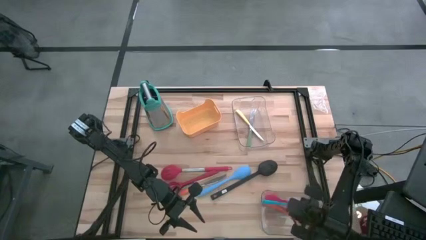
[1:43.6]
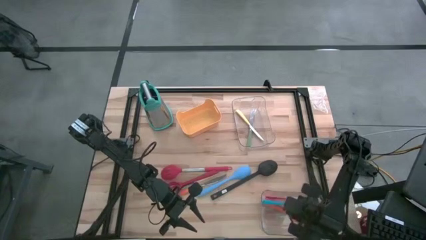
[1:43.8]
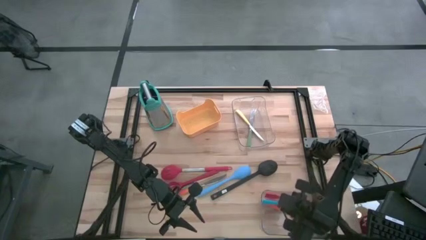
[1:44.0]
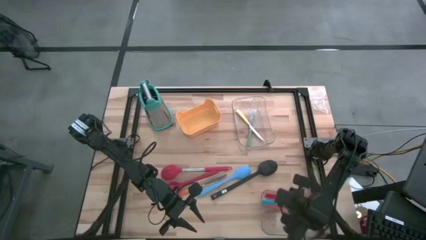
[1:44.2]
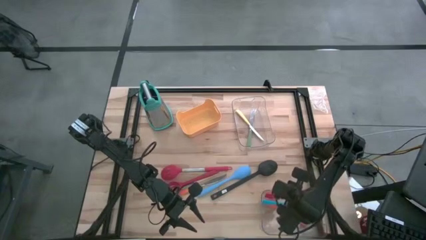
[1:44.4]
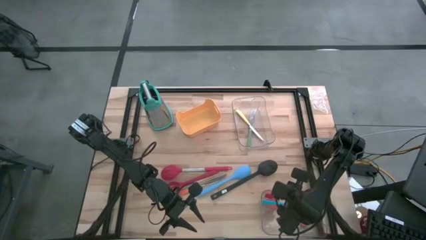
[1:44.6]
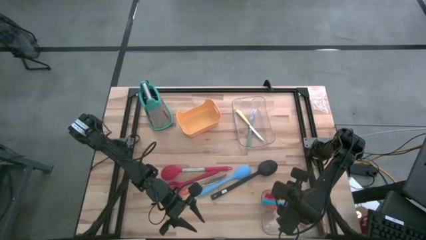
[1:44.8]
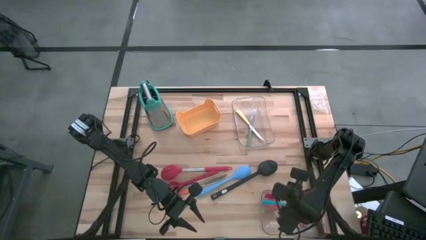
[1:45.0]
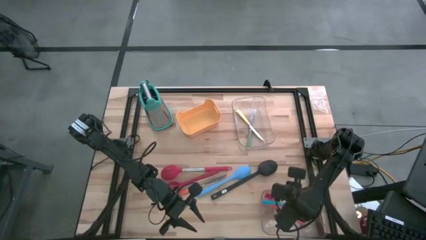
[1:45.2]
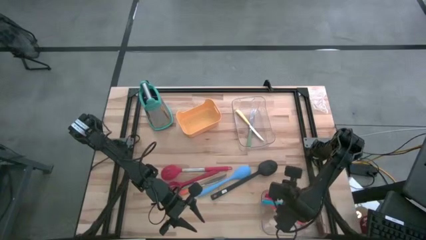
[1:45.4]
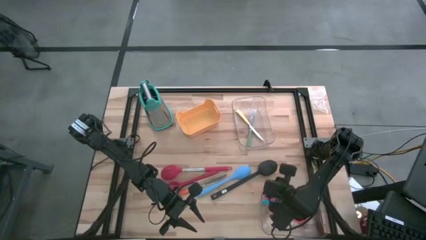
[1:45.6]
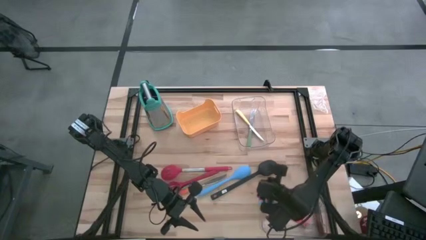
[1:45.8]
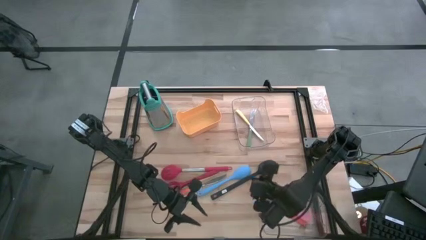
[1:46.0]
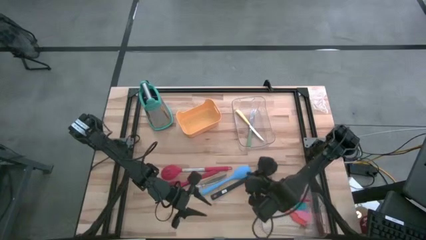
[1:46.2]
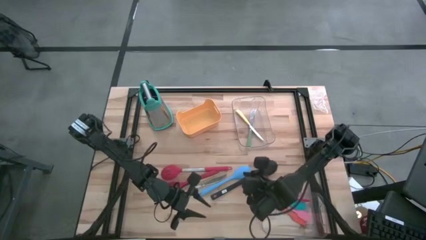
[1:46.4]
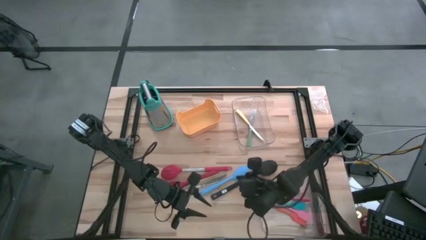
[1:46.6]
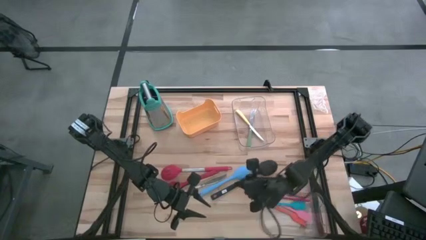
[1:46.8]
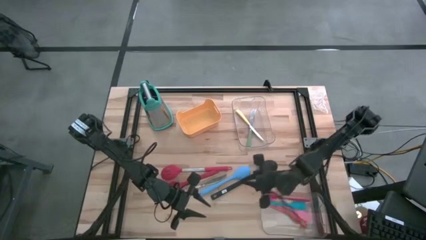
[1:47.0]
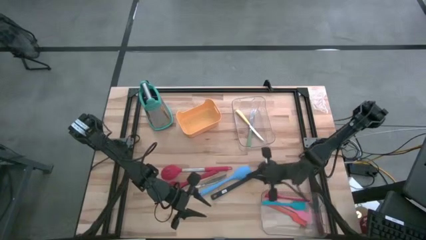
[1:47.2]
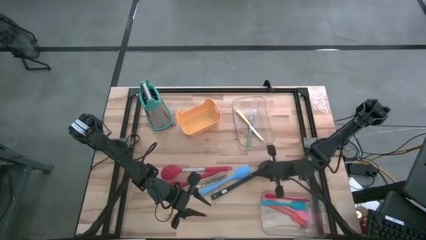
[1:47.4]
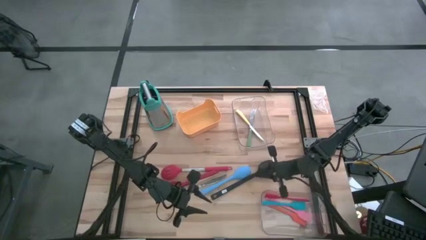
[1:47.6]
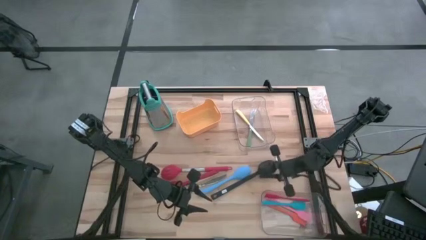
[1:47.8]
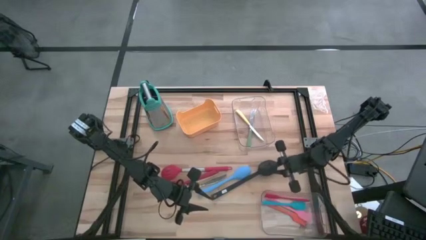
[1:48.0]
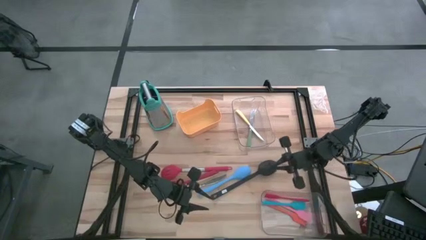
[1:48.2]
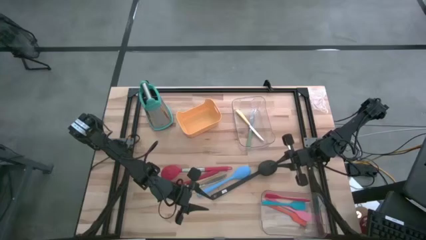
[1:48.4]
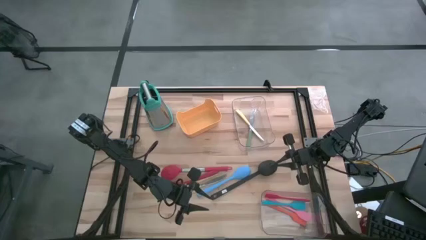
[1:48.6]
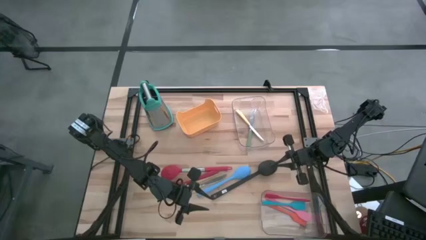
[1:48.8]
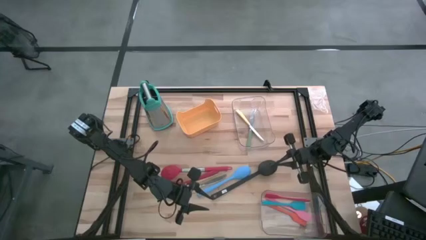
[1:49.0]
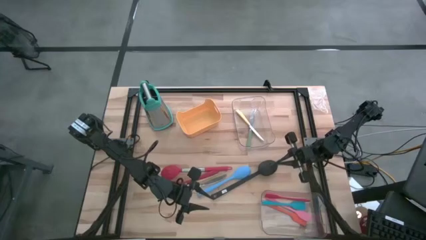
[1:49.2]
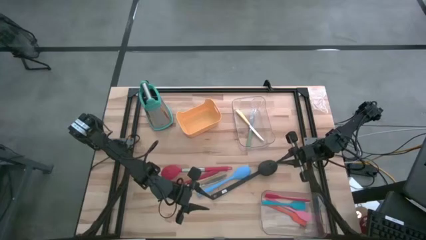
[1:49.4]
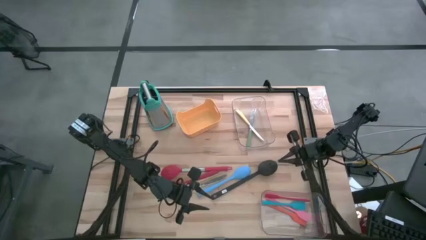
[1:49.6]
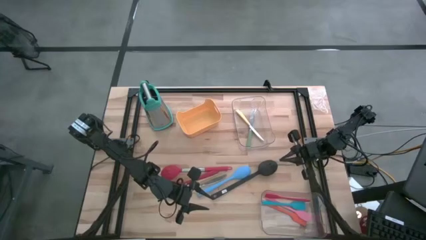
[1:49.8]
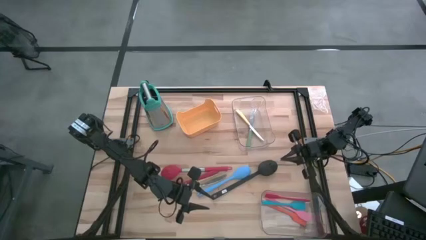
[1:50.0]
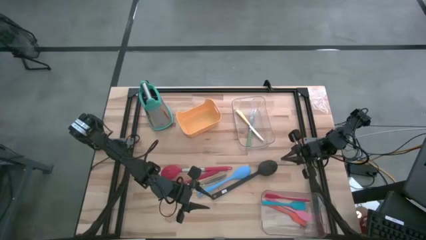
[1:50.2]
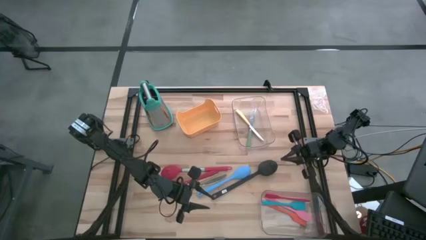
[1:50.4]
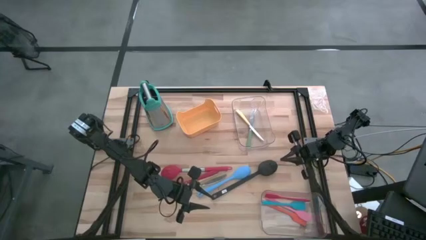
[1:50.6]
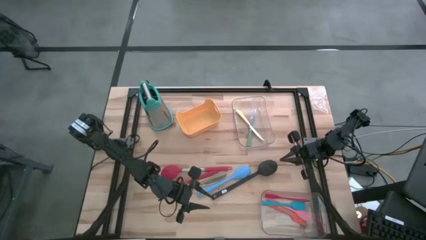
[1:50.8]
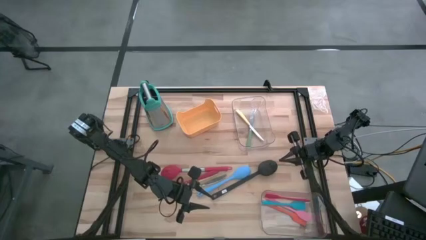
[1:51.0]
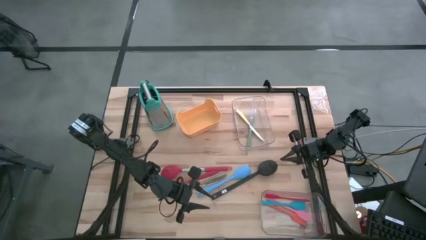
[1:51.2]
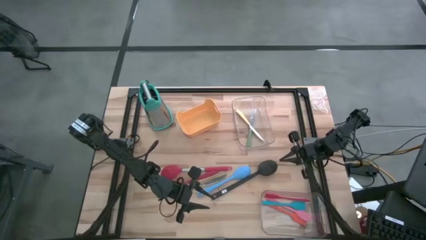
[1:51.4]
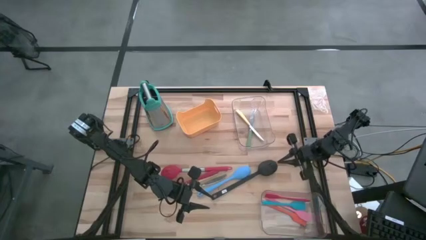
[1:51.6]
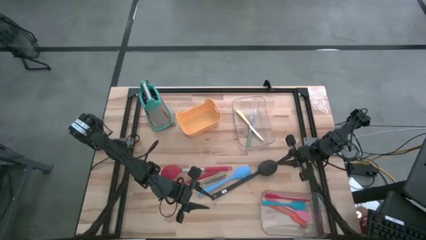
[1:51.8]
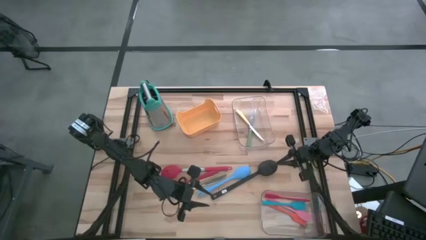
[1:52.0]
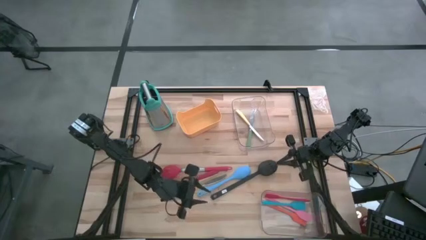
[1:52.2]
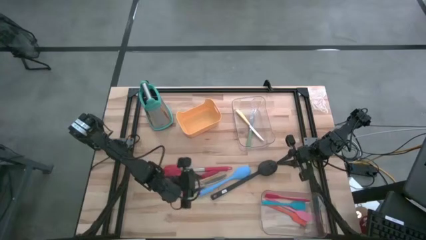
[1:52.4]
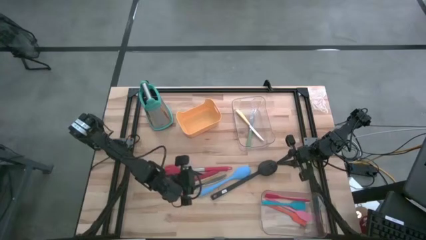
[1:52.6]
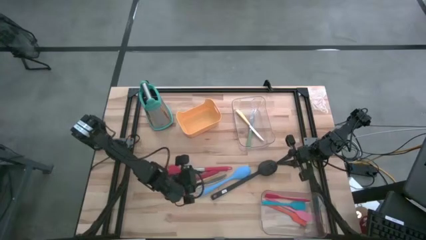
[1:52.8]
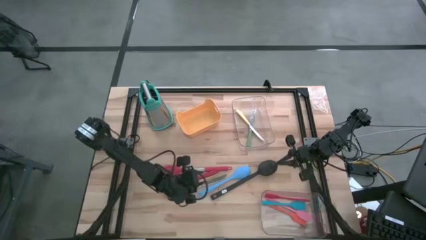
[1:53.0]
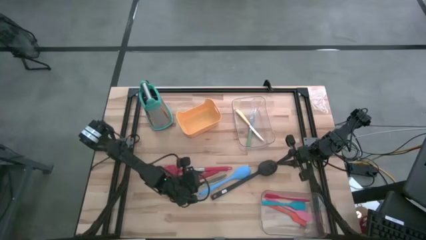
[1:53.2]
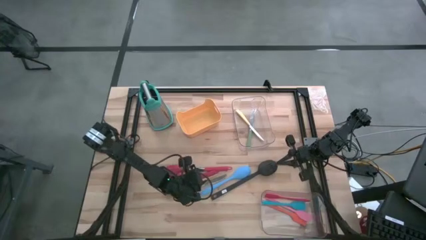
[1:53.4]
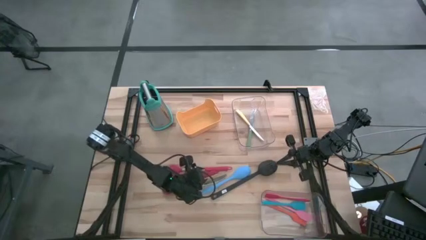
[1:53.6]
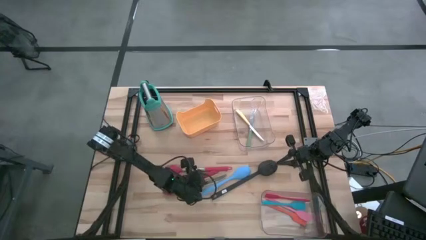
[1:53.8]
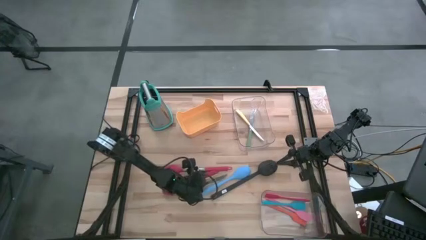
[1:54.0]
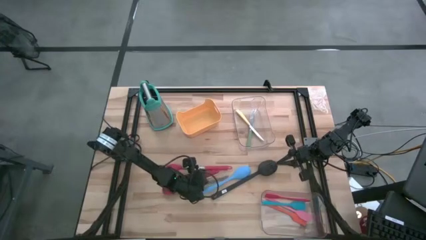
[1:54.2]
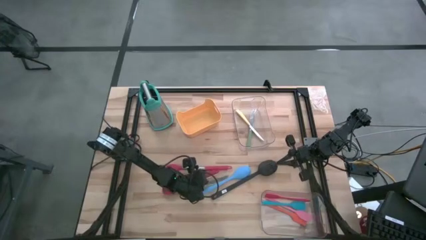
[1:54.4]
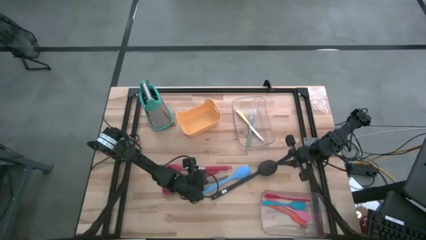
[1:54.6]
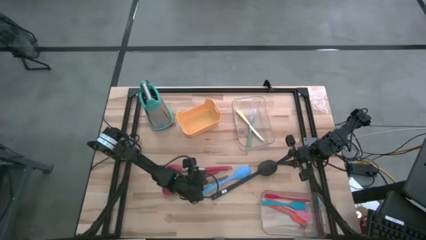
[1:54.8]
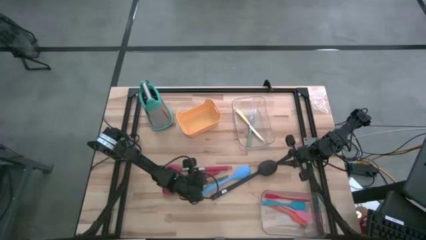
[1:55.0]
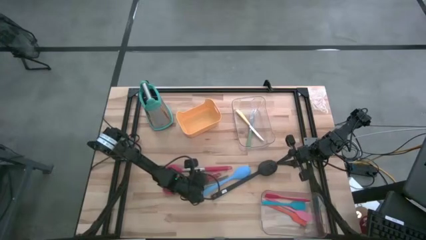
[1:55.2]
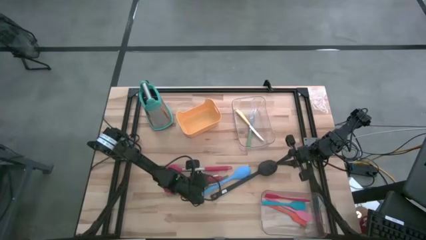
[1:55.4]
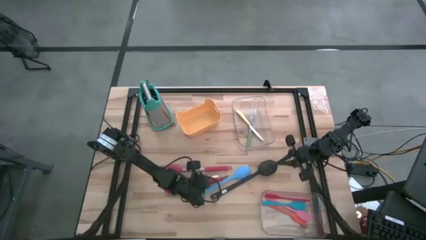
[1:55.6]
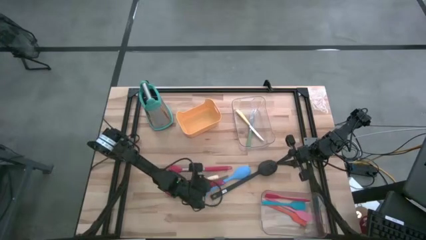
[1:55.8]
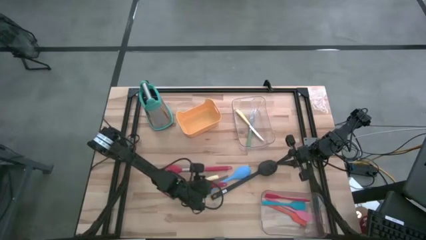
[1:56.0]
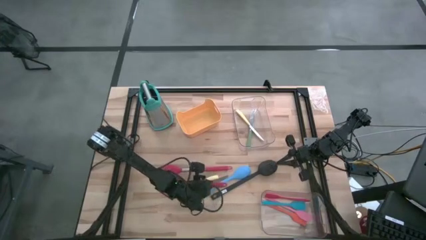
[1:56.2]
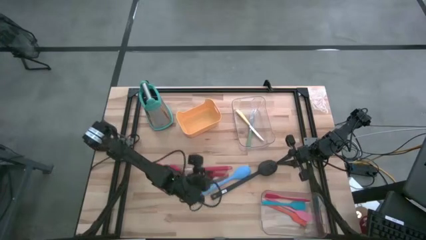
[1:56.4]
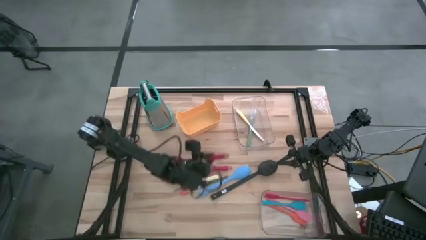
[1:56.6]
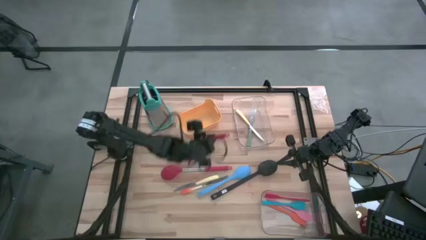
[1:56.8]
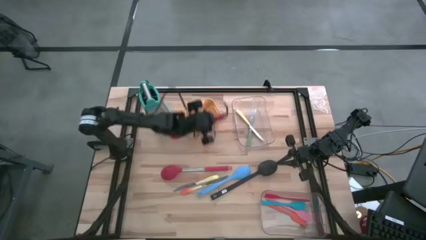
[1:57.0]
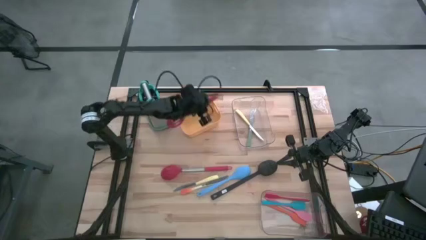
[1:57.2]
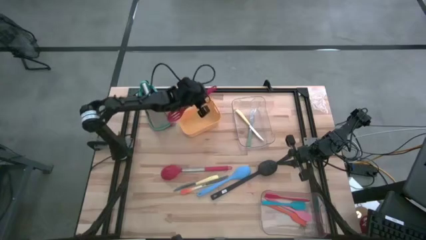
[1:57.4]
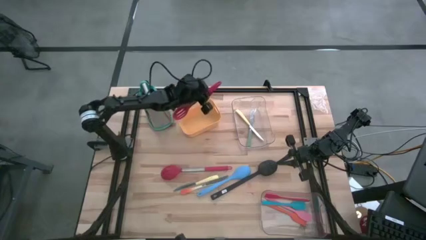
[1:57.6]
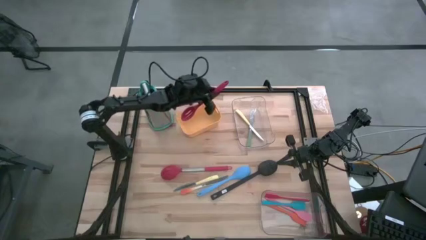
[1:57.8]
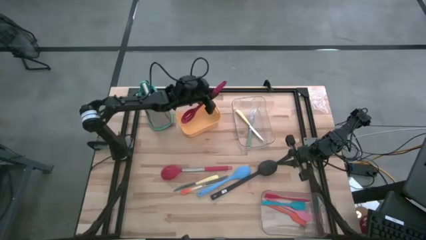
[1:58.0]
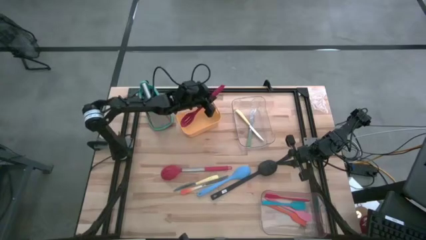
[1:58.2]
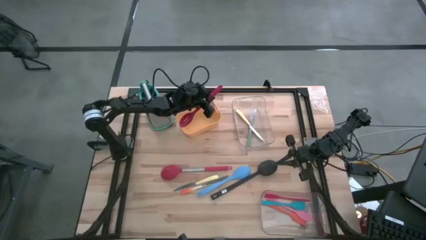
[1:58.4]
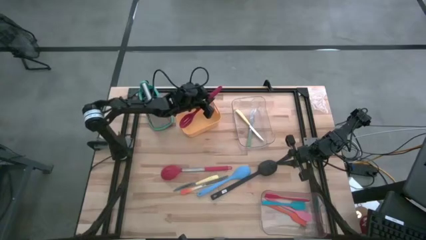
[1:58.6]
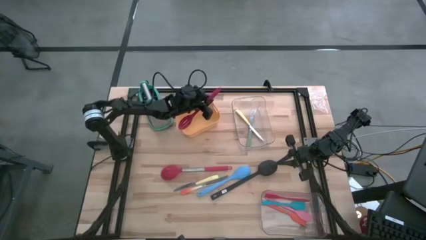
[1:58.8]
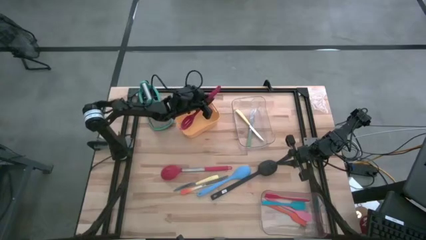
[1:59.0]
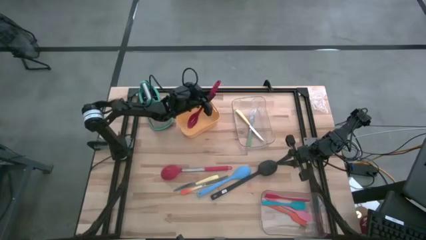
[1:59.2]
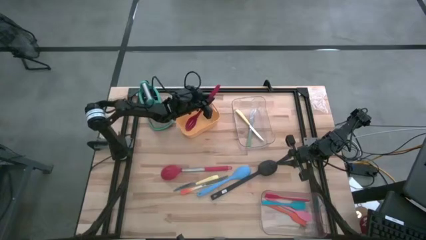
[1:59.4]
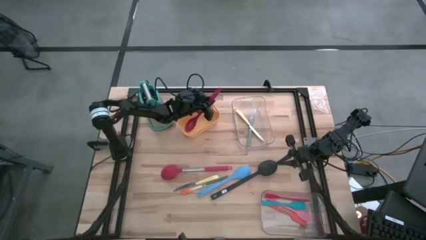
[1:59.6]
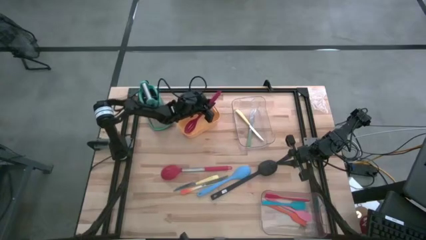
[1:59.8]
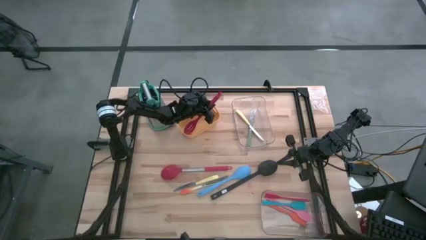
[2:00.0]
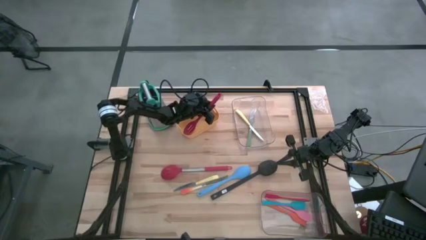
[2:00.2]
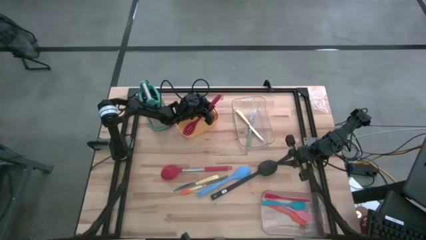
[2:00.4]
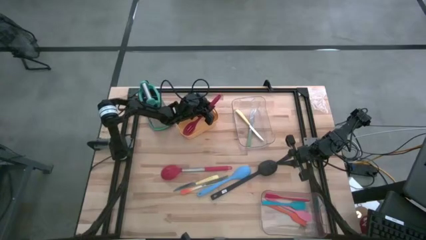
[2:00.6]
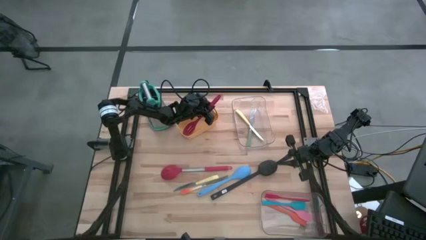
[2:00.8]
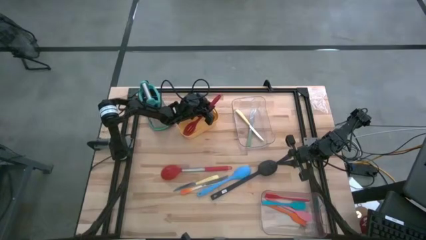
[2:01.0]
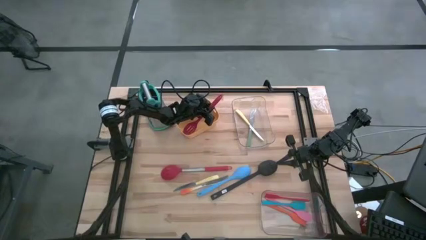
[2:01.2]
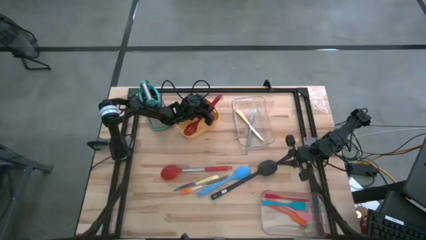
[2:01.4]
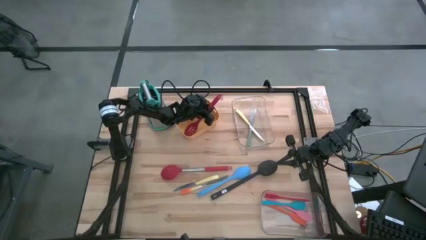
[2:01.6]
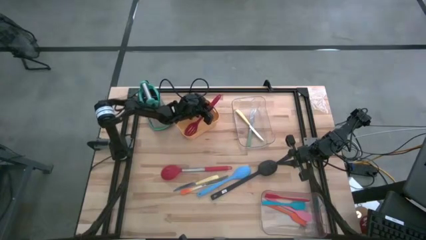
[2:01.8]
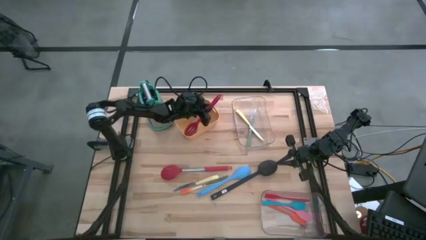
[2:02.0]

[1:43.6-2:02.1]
Task: Pick & Place Kitchen Items
Put the bottom red slotted spoon into the orange bin
